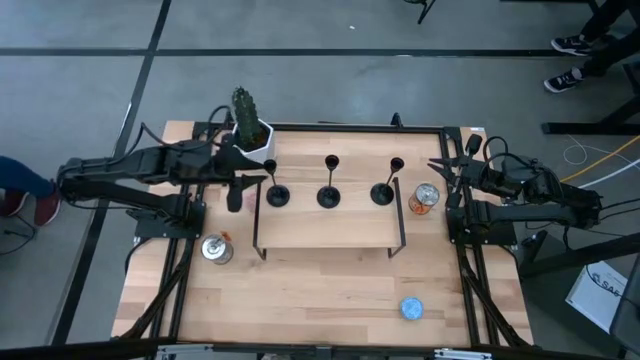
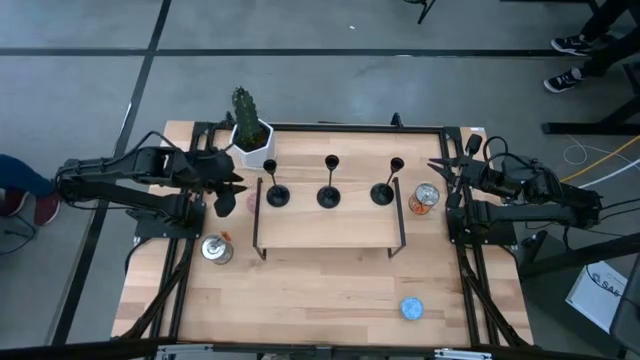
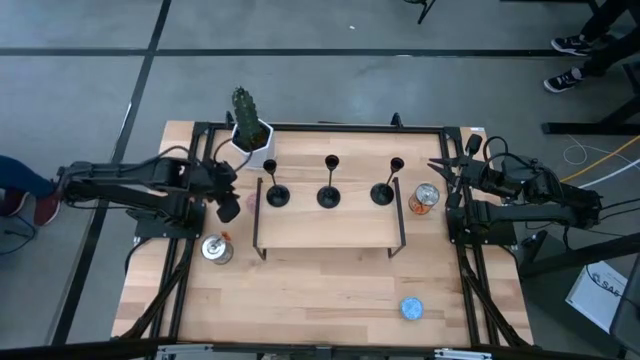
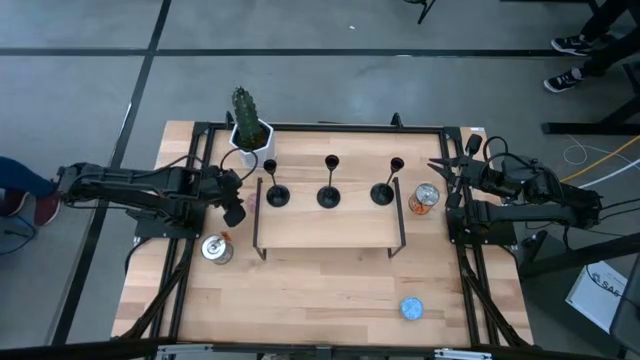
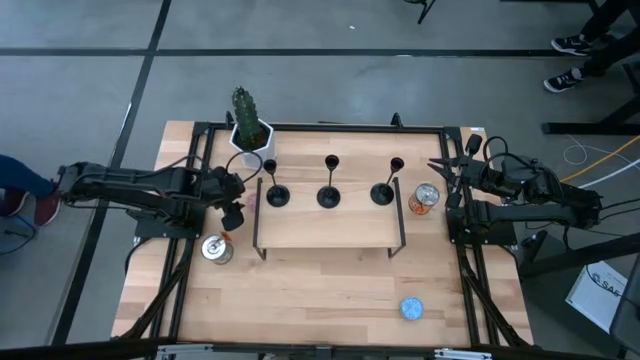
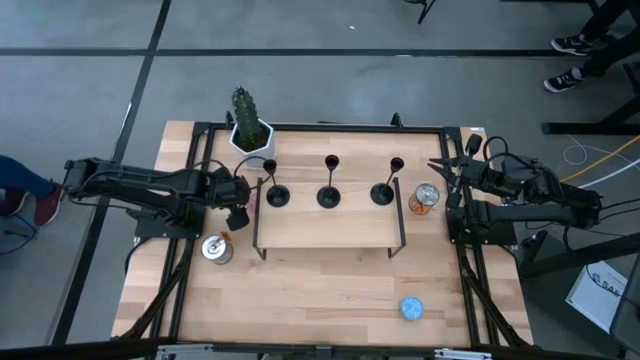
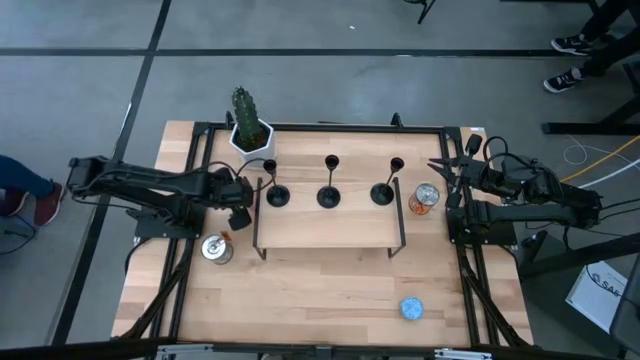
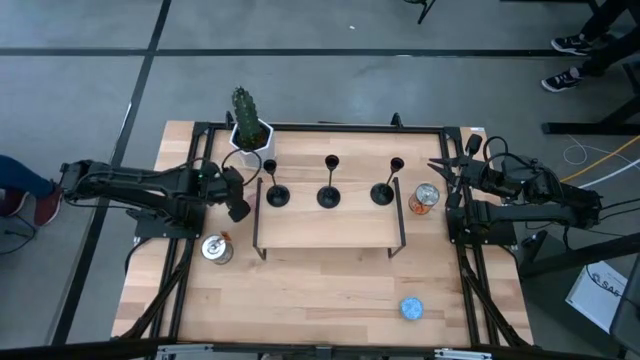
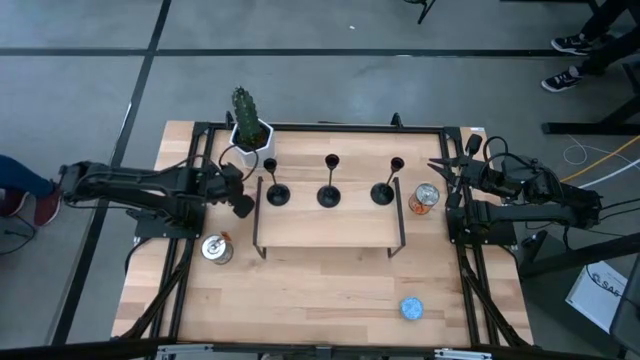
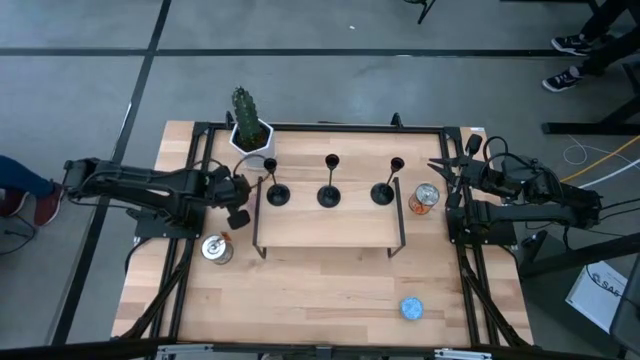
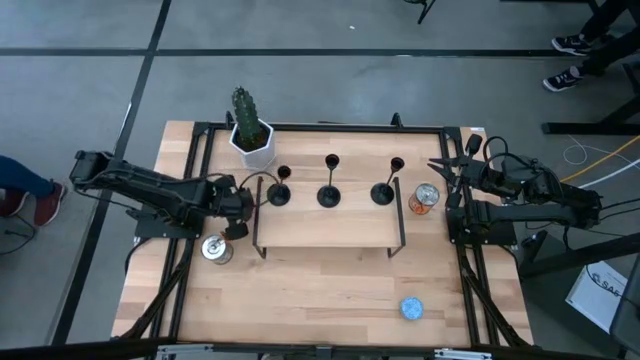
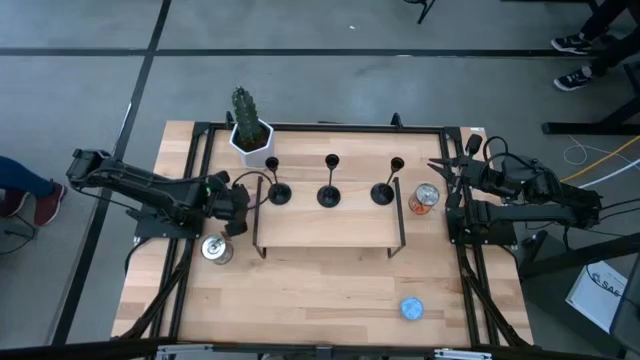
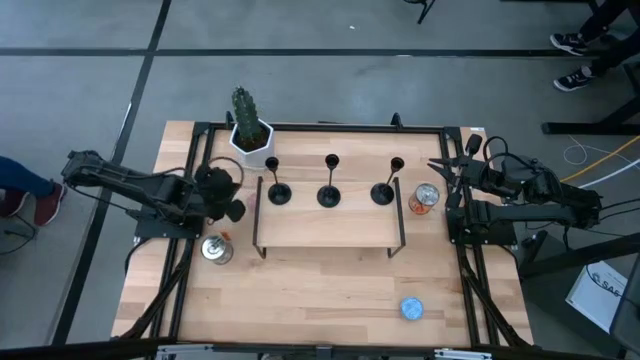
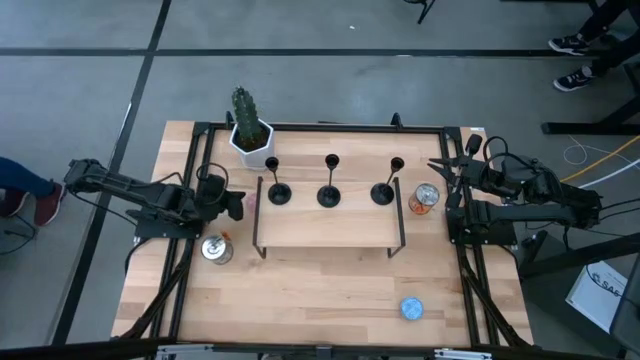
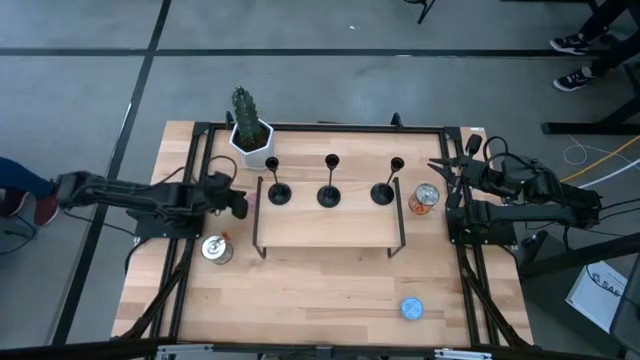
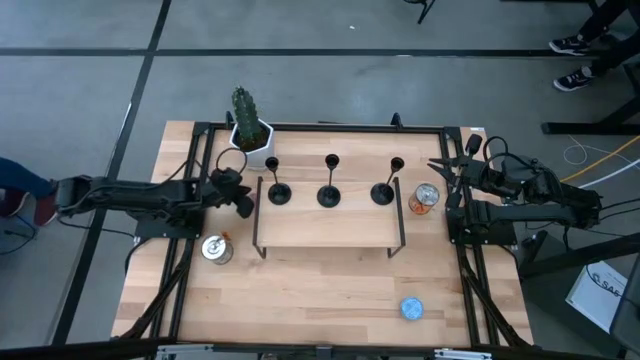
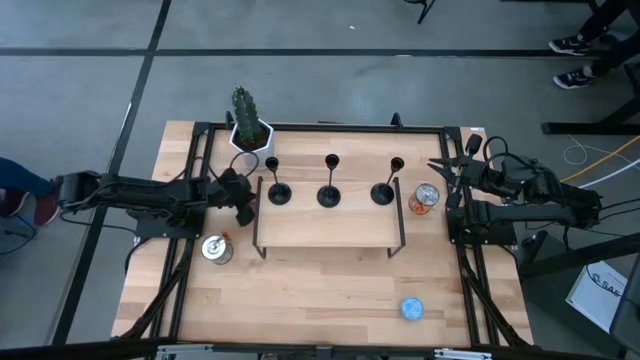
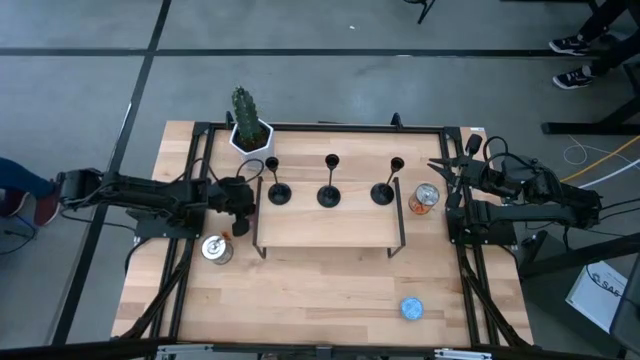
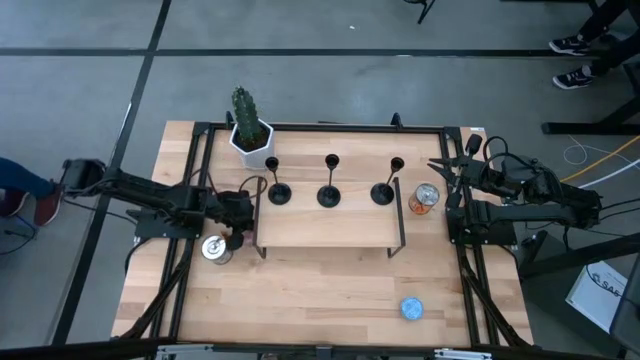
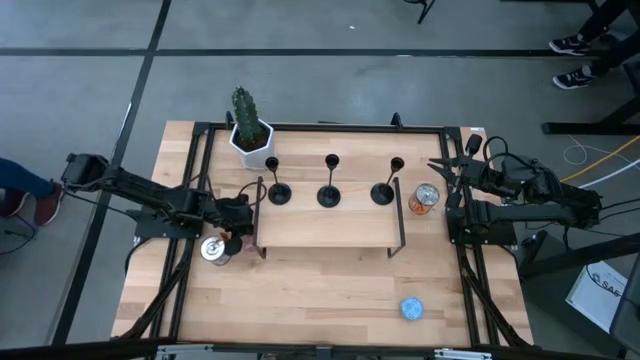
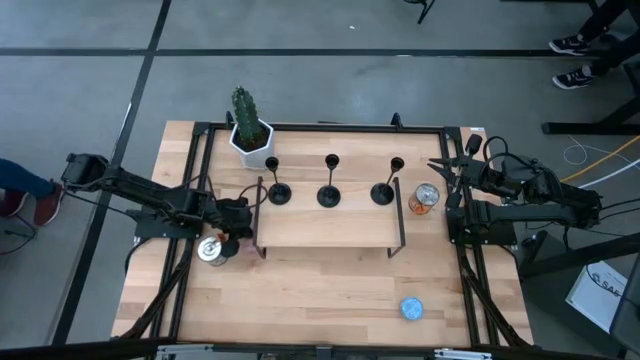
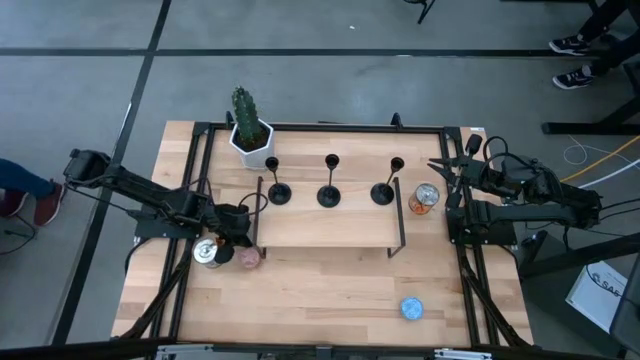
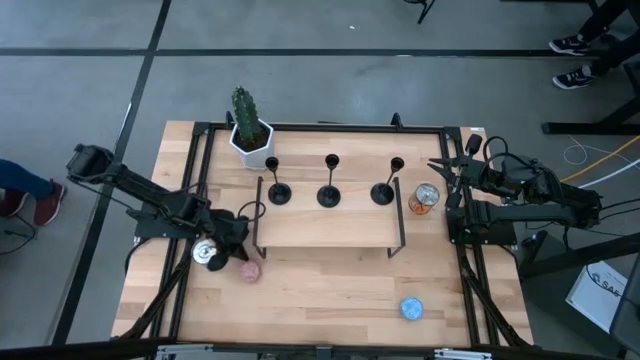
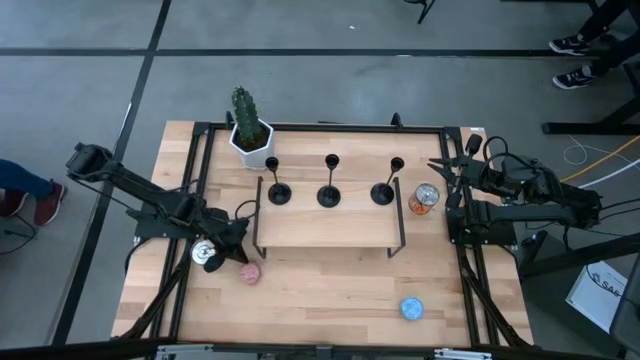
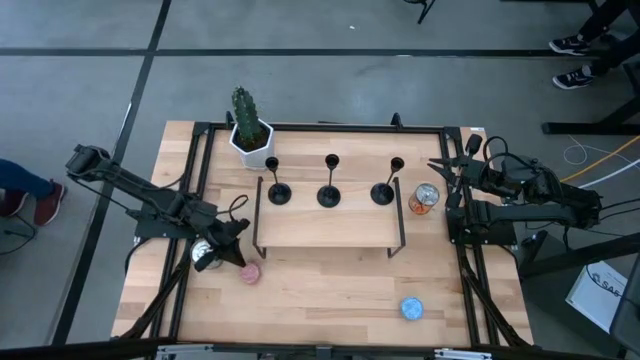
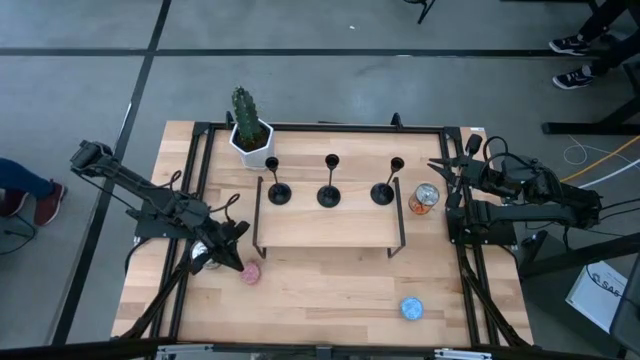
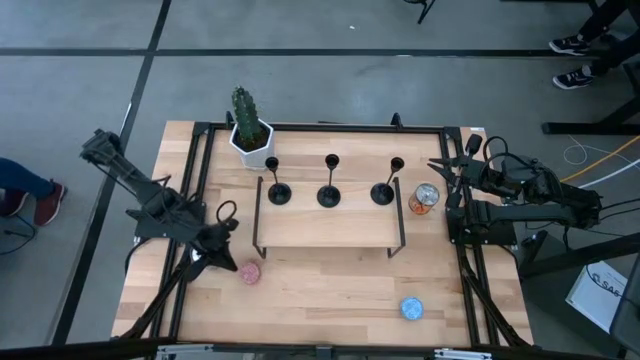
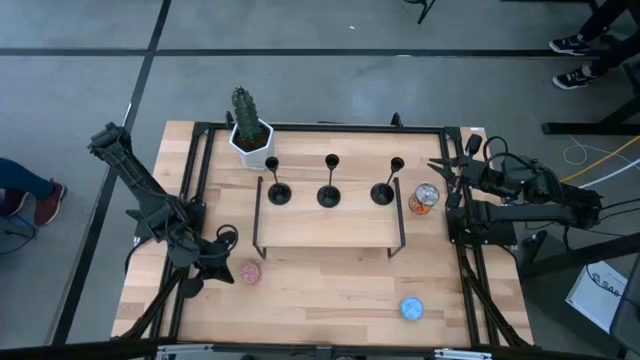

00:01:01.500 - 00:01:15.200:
Task: Pick & Place candle stick holders
Put the red scented candle on the shelf

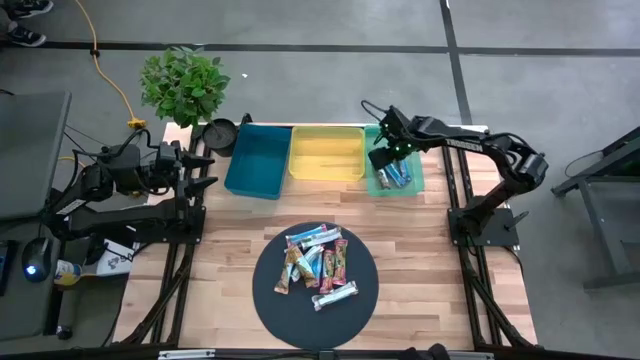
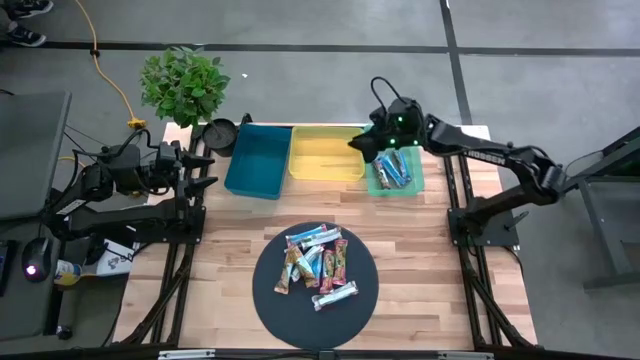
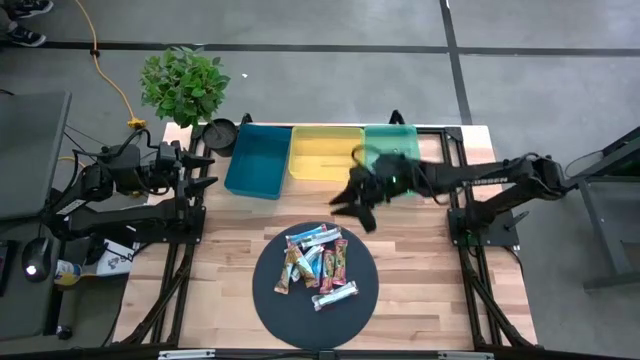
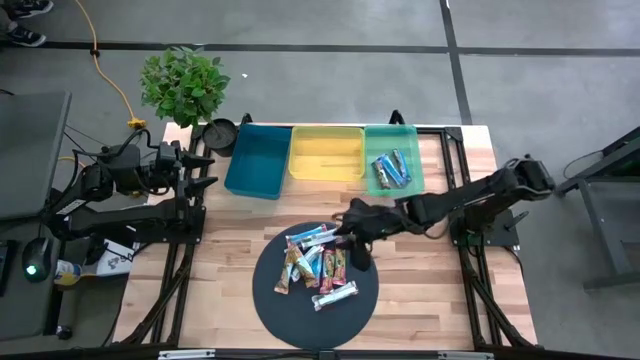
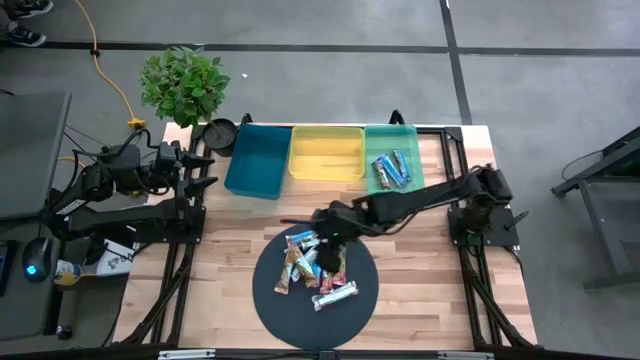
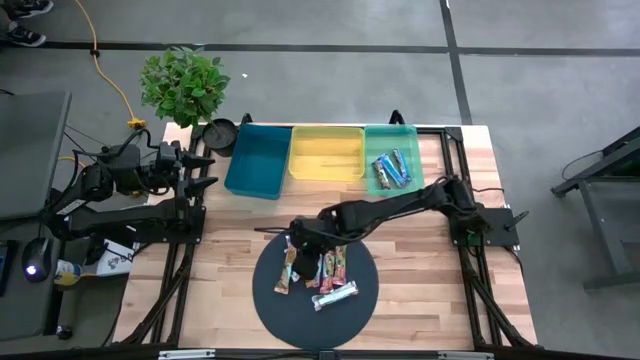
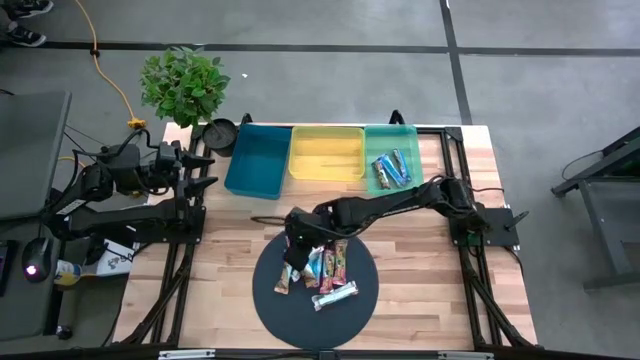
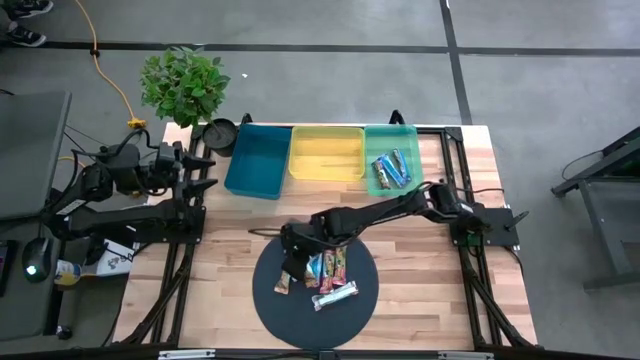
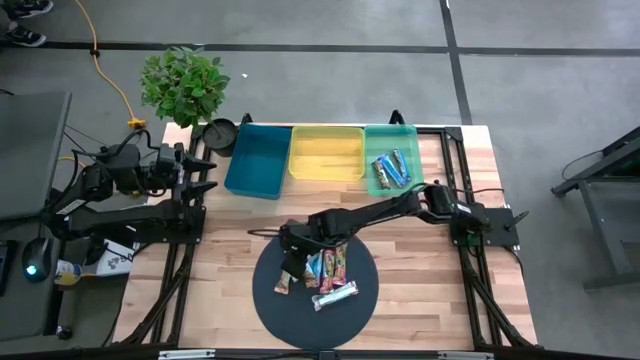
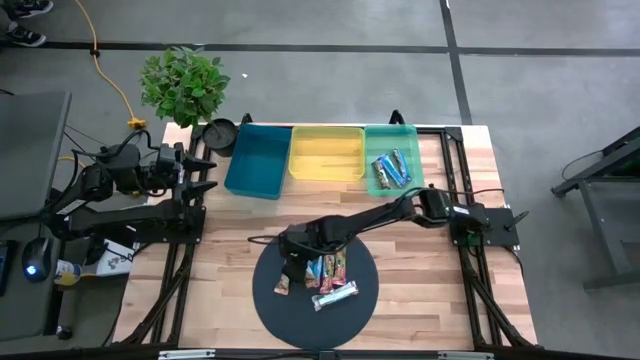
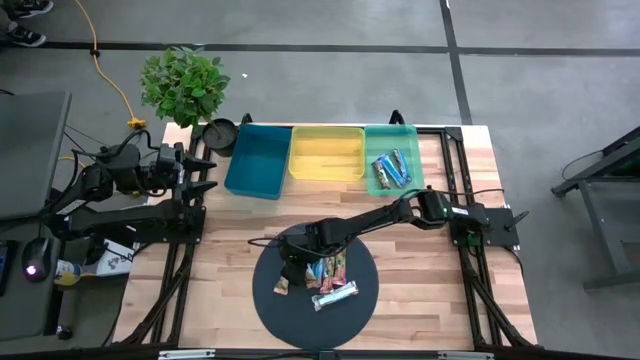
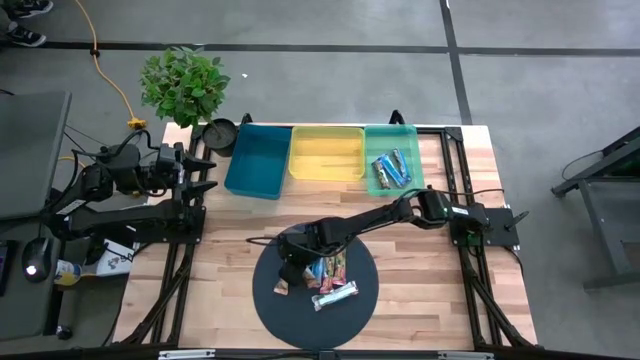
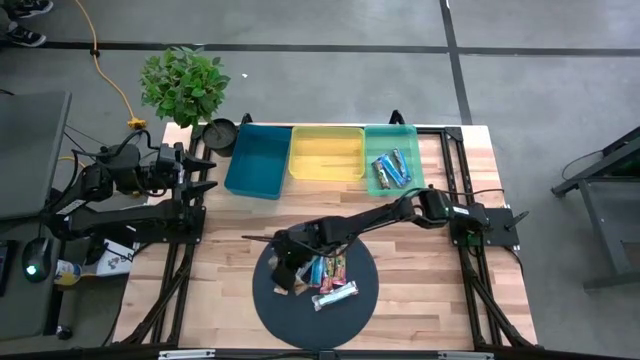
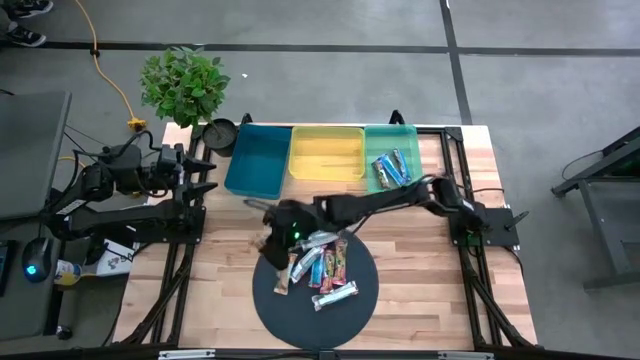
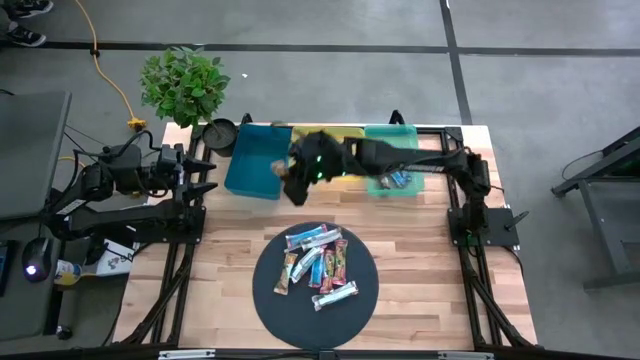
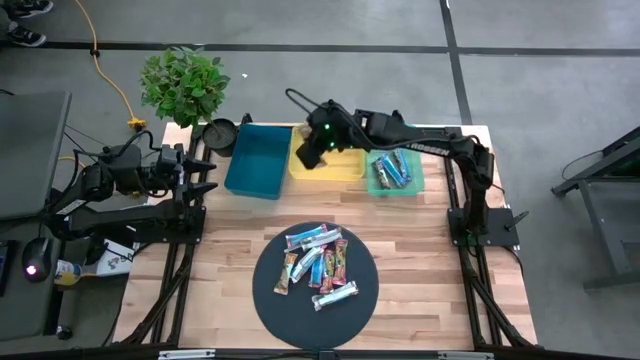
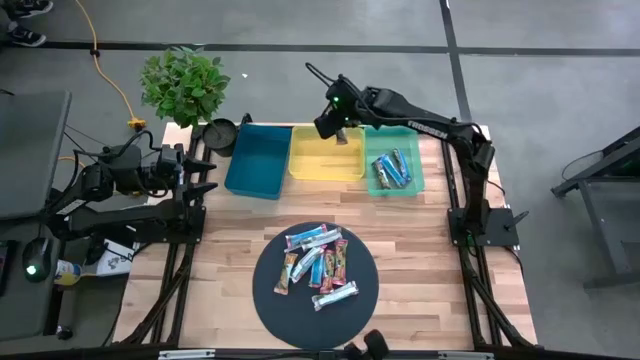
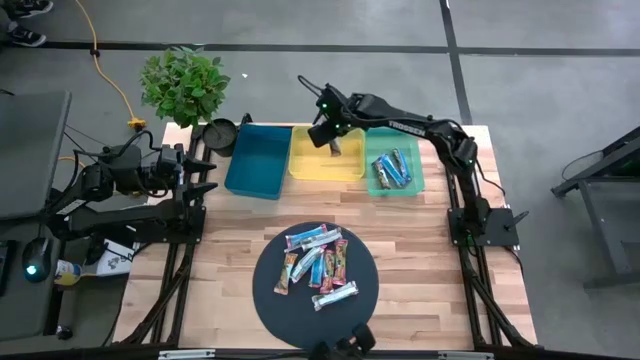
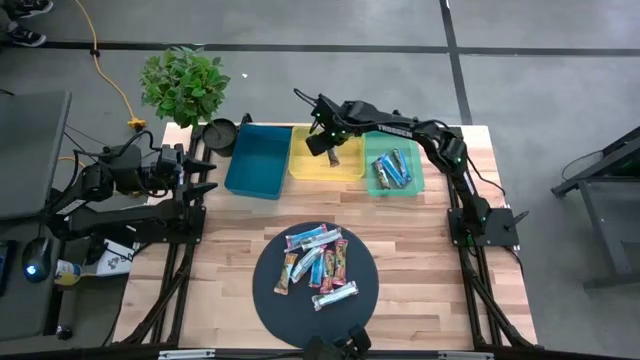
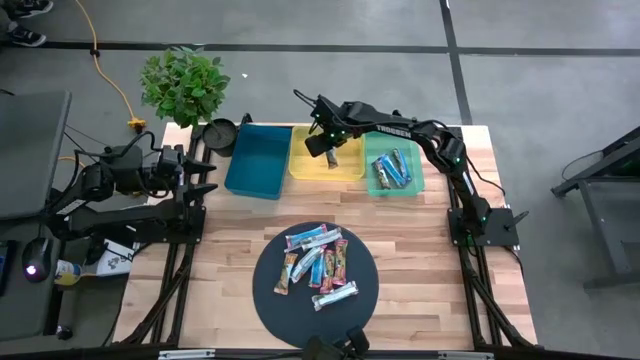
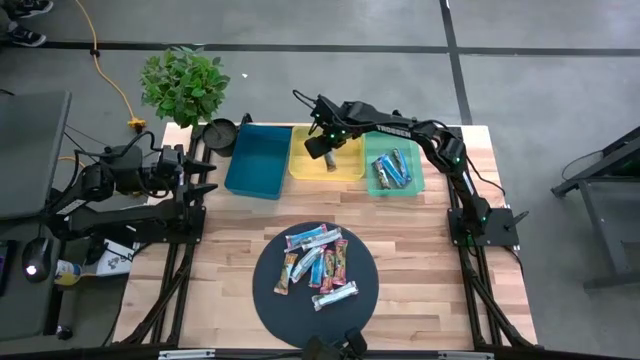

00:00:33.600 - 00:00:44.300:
Task: Pick and place Granola Bars by type
Put the yellow granola bar into the yellow bin
